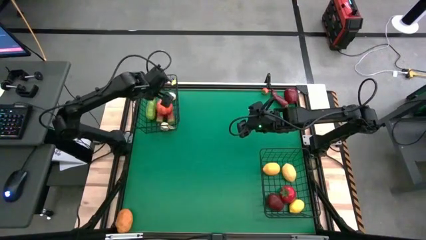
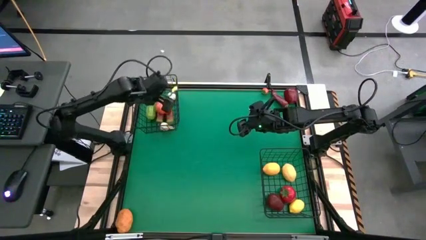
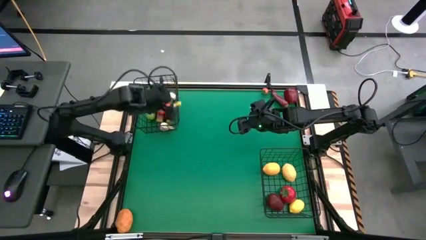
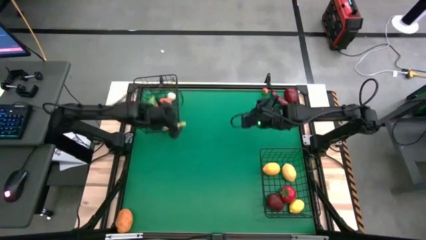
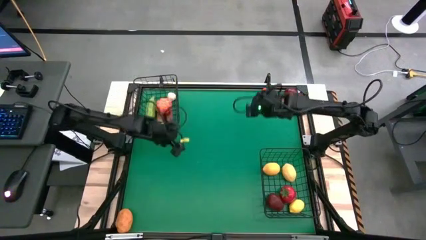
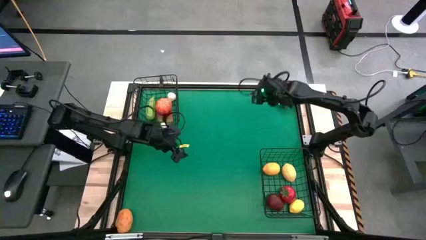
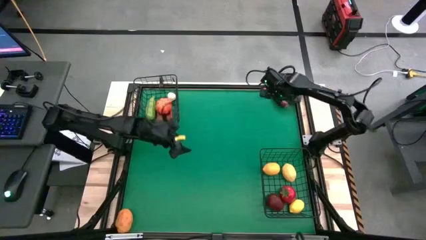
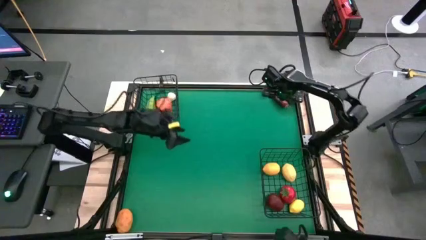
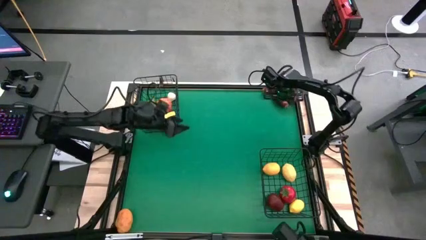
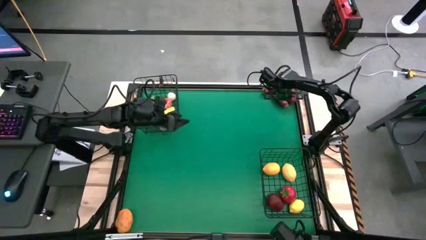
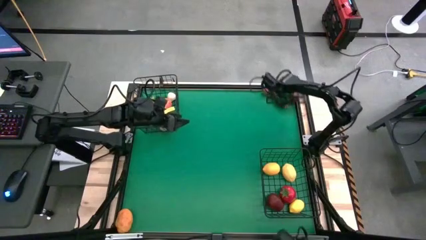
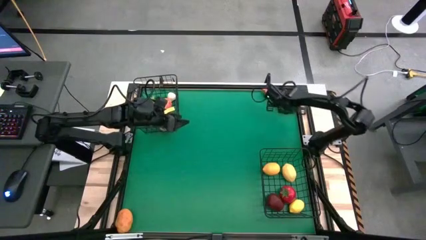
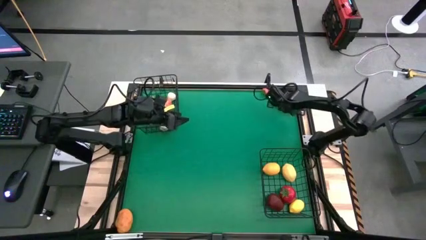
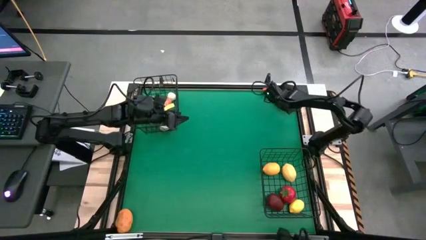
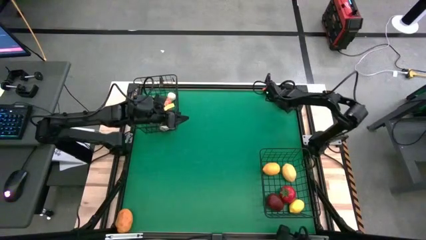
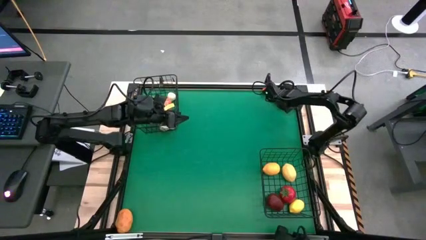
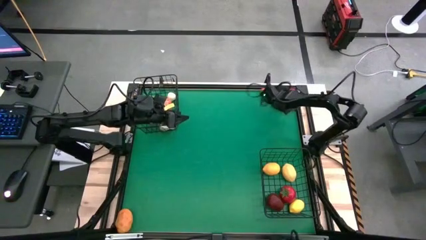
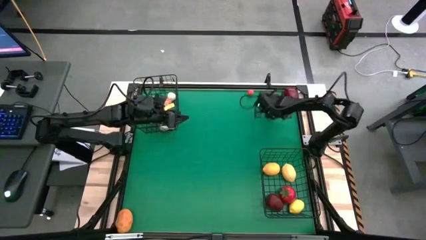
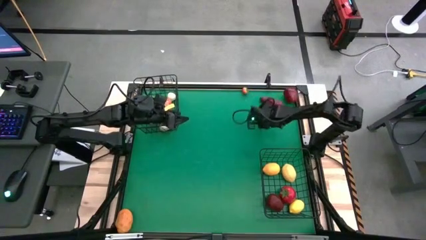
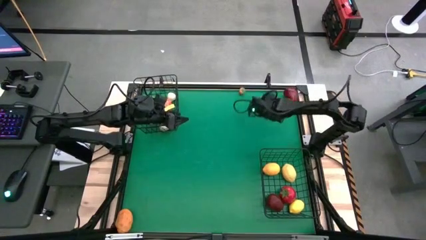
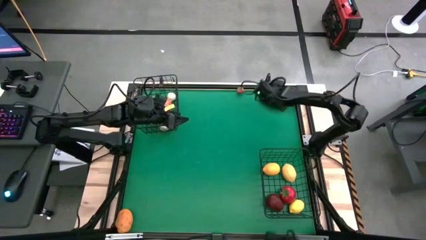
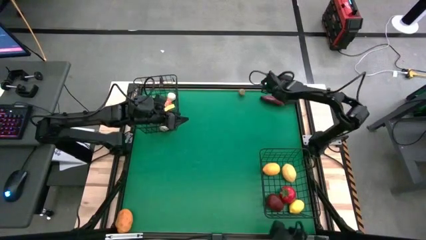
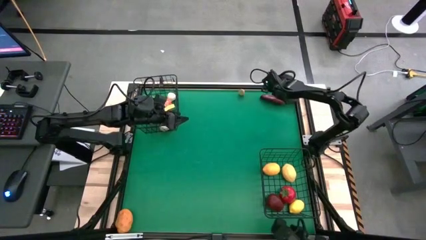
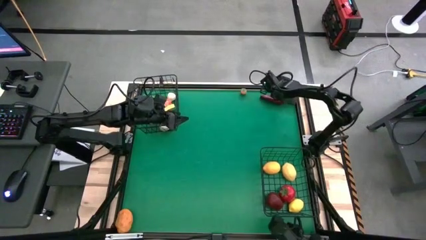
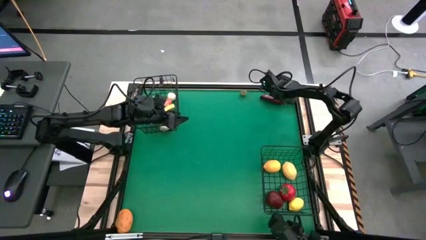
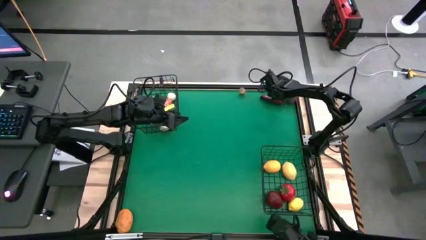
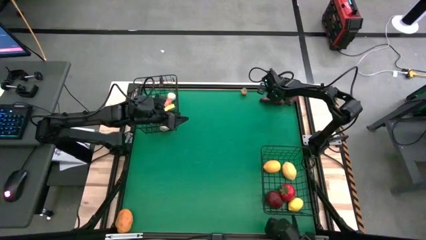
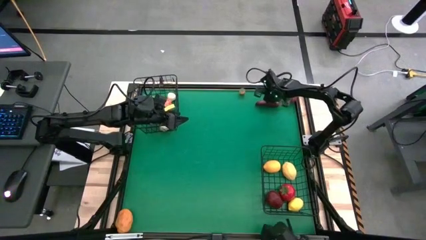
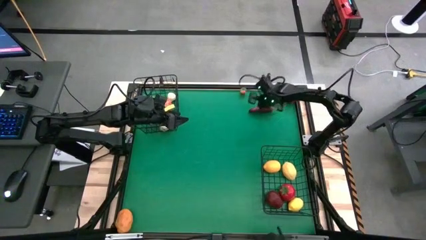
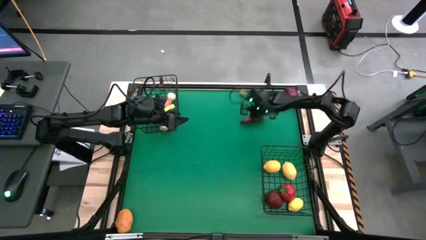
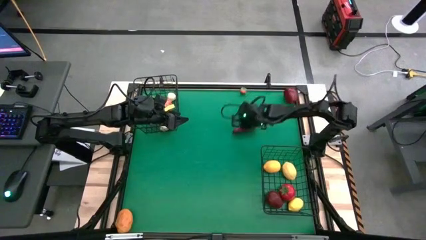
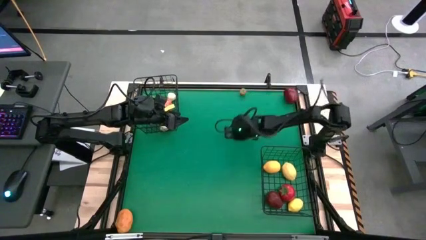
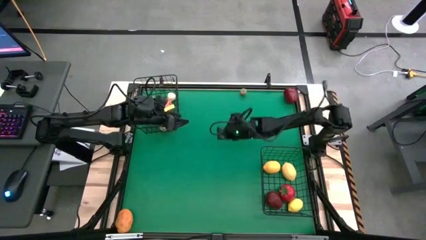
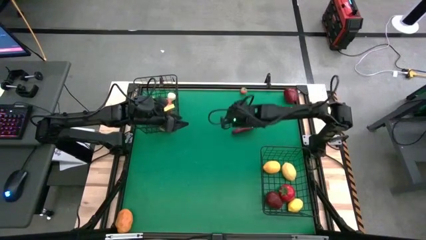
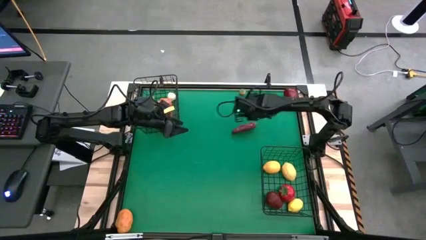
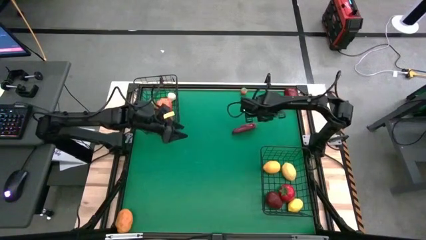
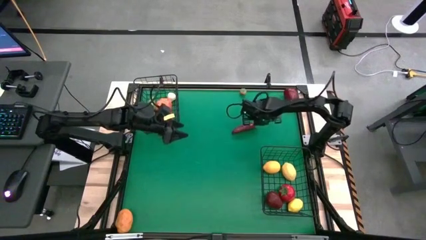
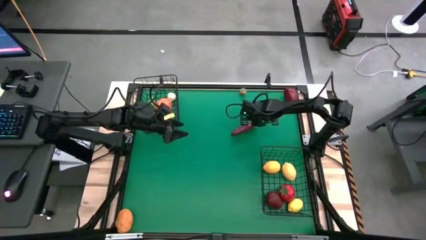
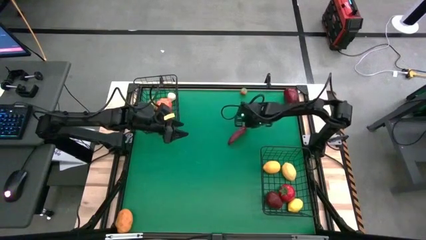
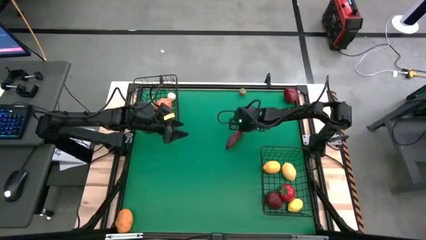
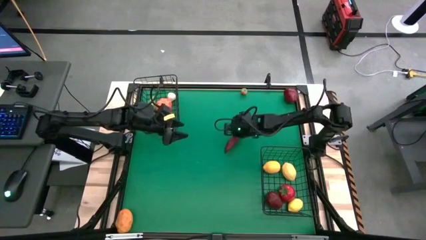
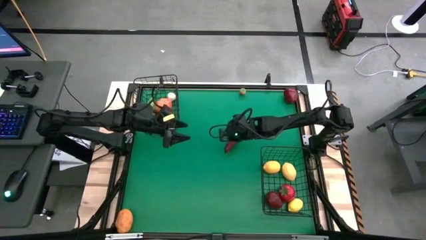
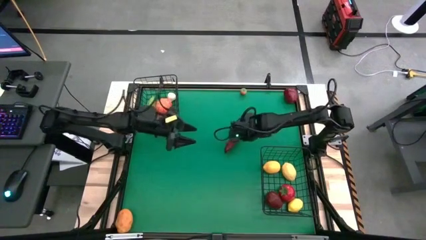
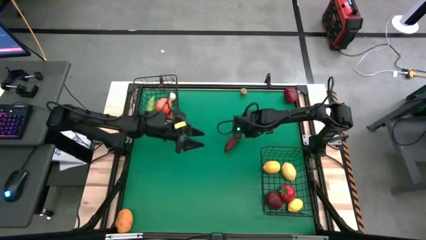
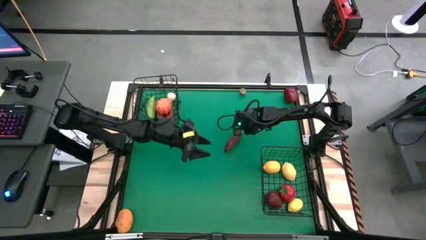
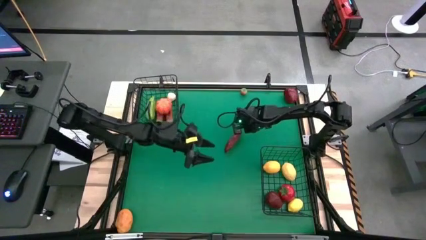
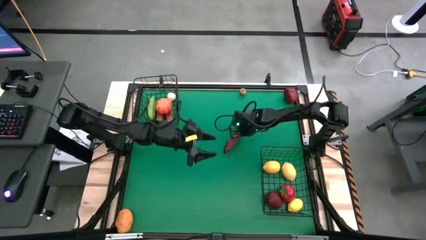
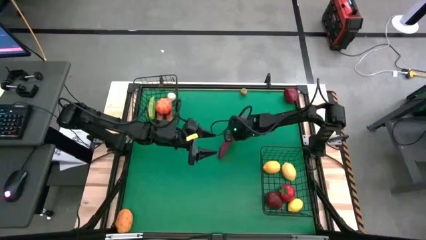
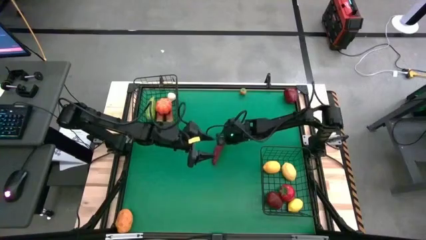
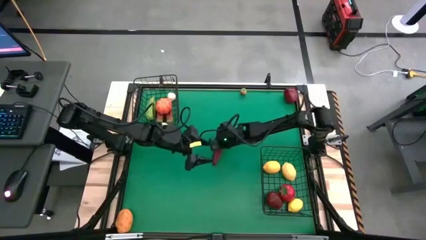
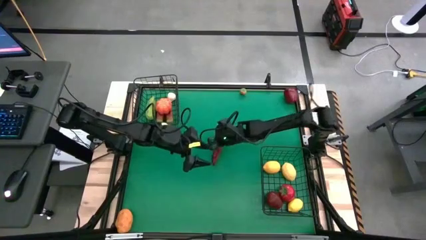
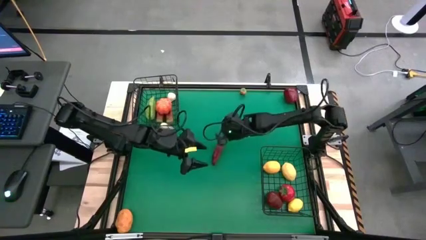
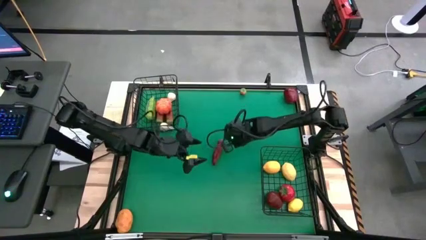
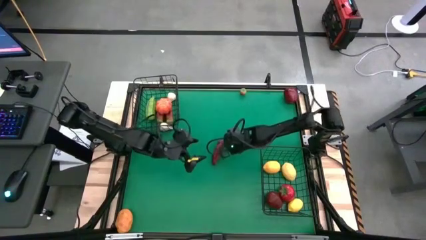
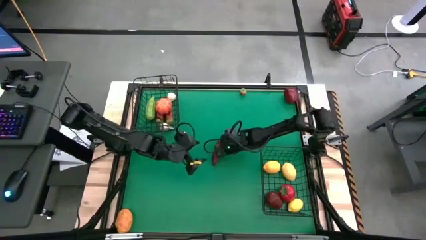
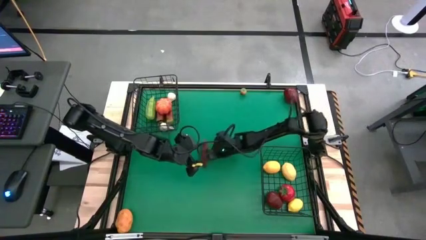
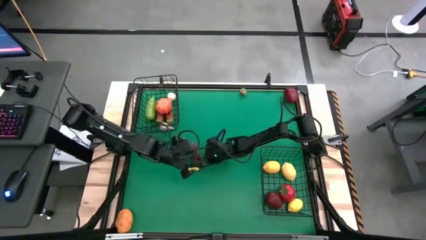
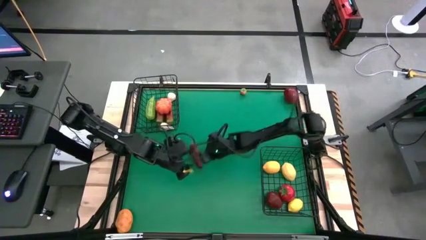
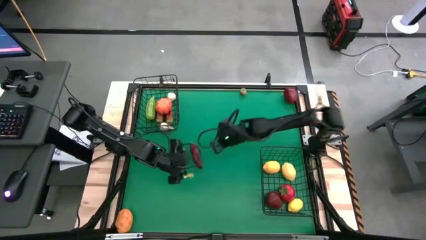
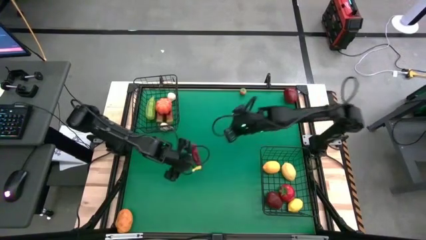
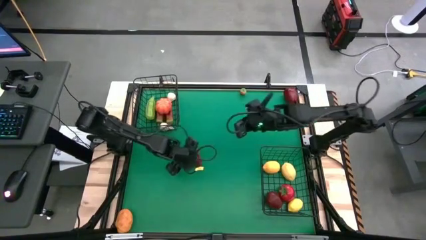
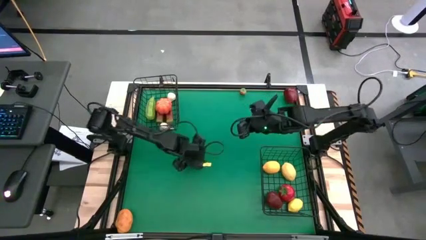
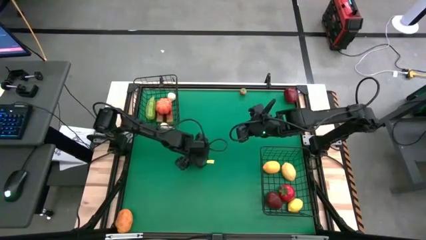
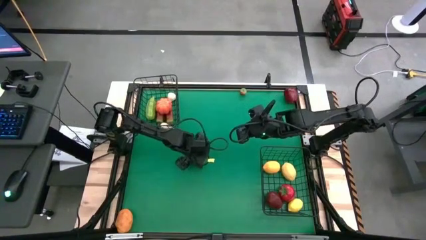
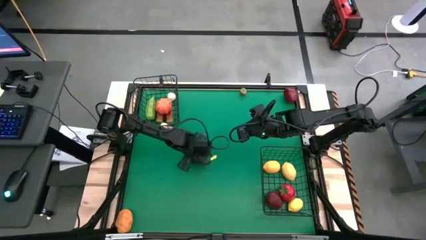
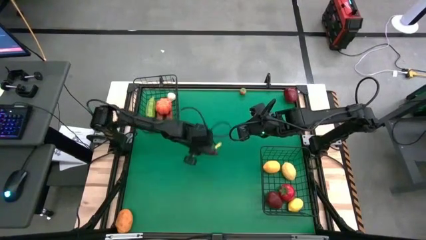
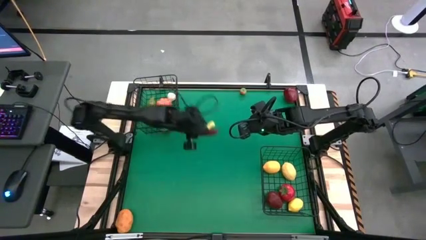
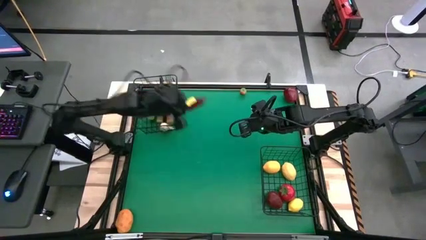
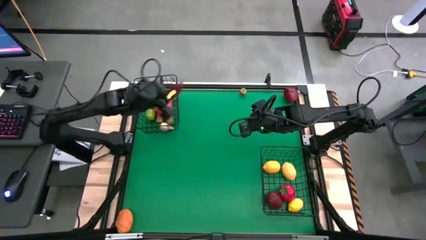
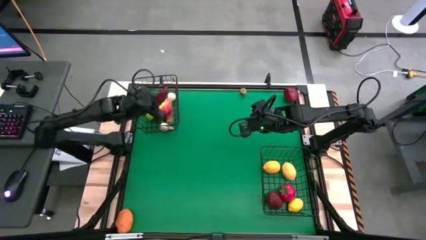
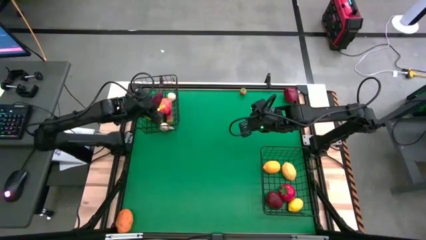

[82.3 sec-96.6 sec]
Task: Sort produce into baskets
Put the red chili pepper into the top black wire basket

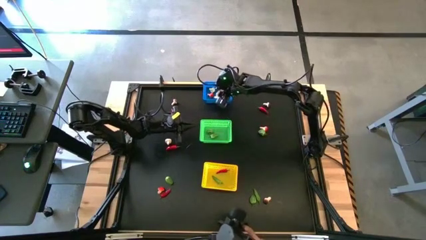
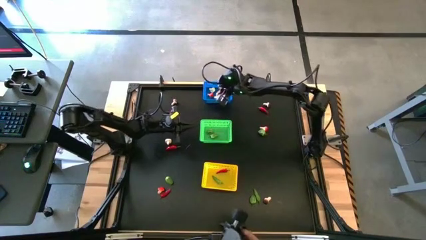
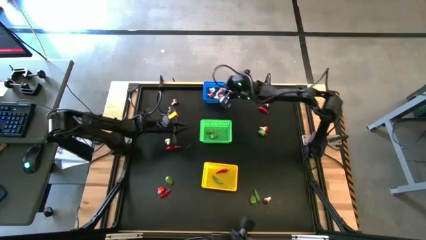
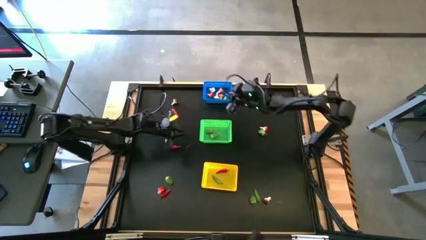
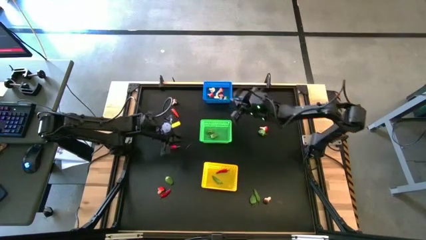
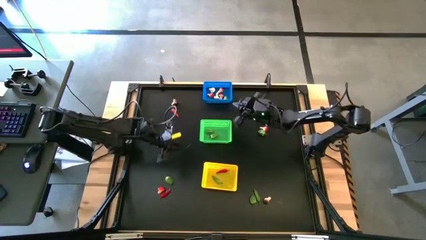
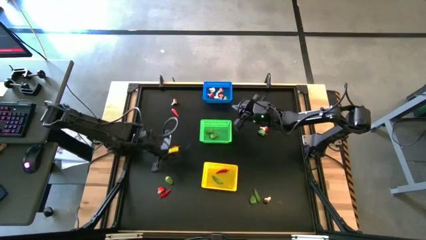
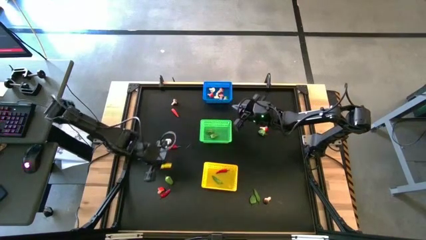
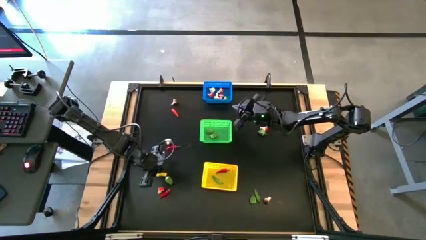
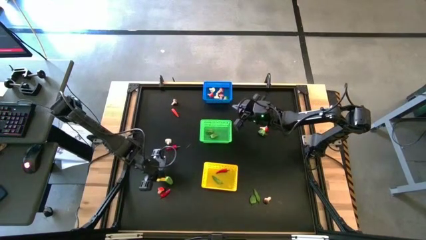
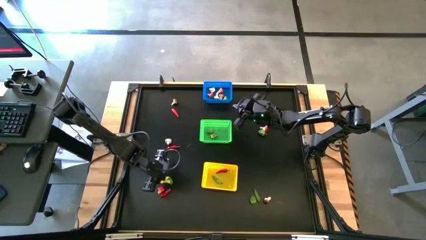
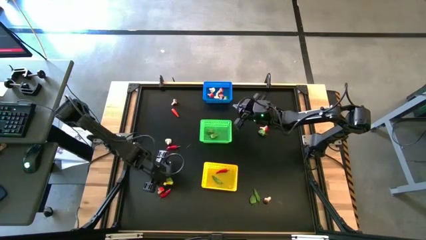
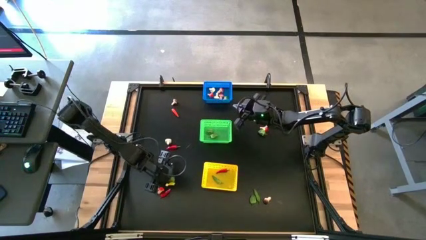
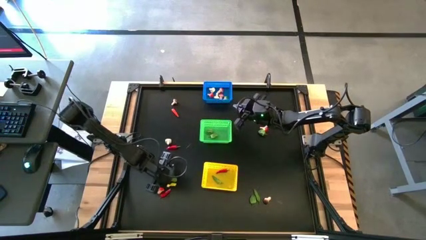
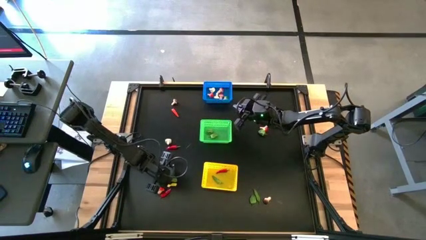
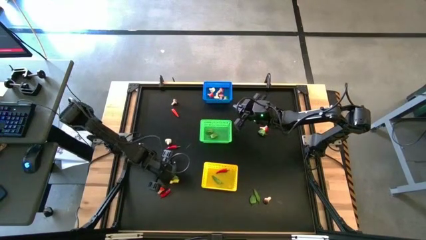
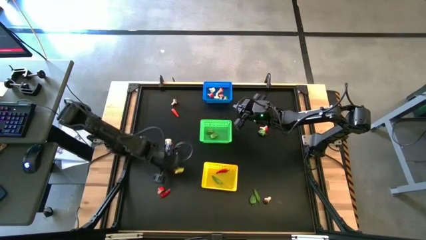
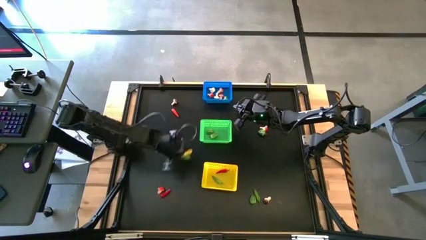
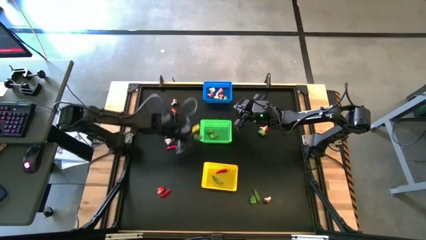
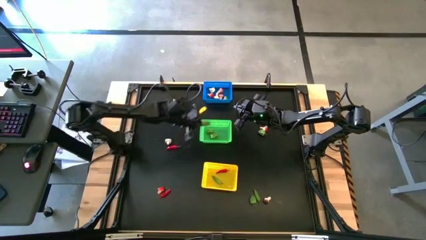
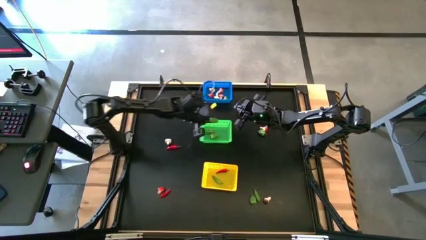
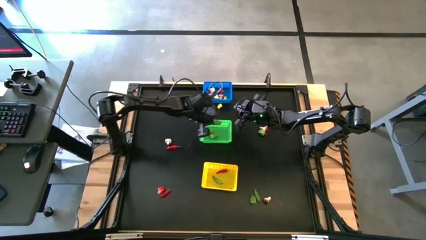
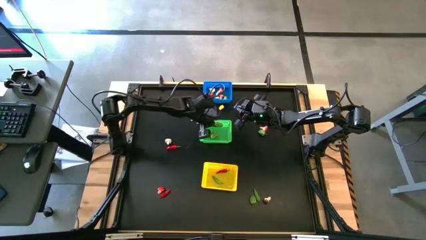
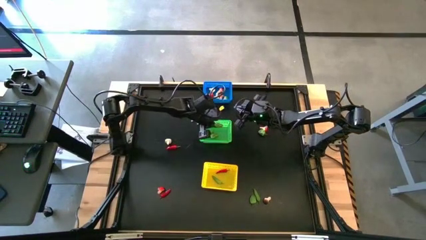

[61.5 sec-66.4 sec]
Task: Sort produce into baskets
Put the green chili pepper into the green bin
